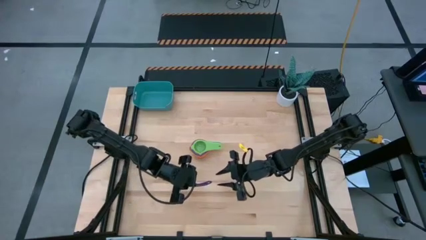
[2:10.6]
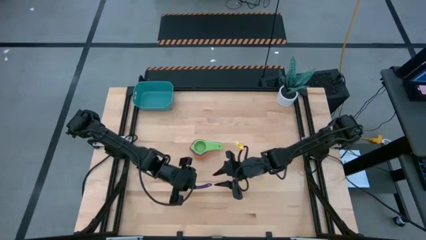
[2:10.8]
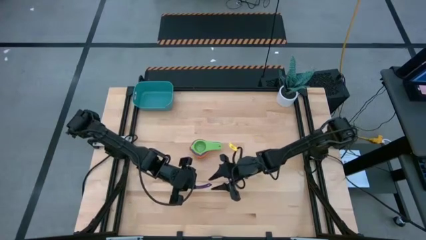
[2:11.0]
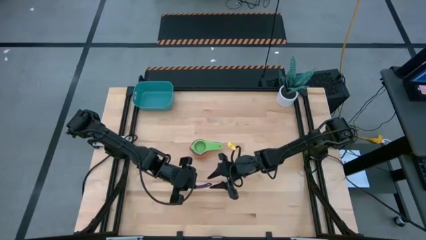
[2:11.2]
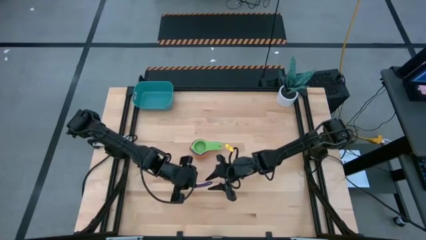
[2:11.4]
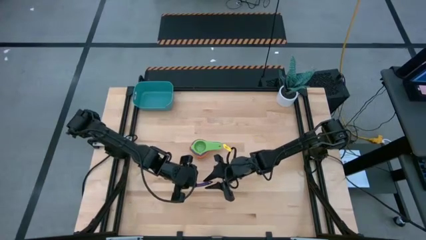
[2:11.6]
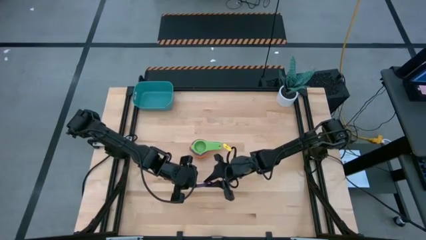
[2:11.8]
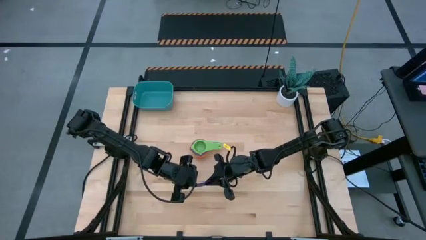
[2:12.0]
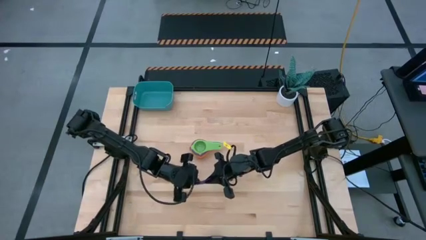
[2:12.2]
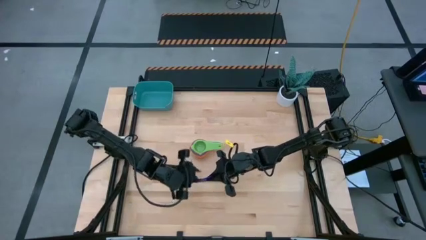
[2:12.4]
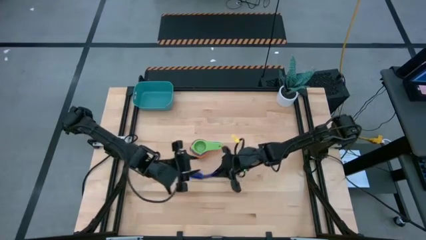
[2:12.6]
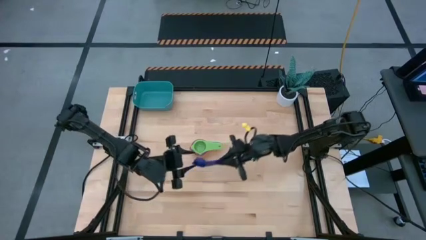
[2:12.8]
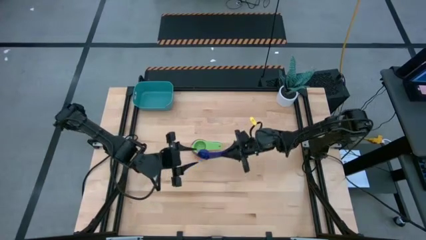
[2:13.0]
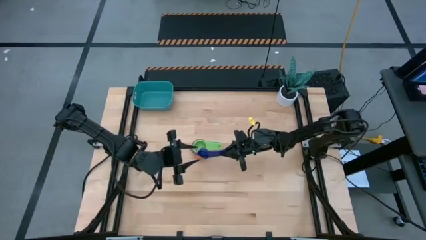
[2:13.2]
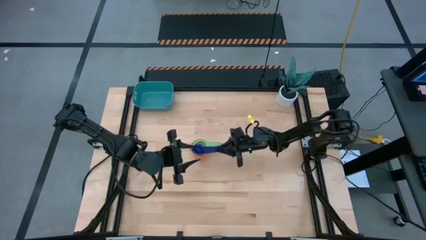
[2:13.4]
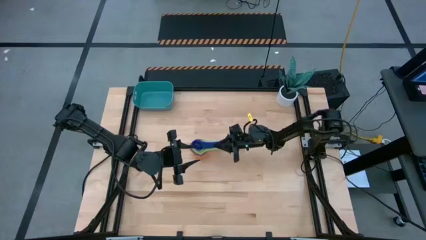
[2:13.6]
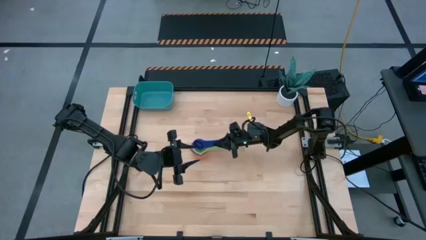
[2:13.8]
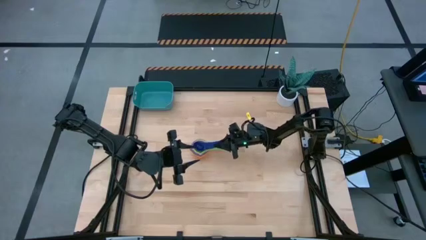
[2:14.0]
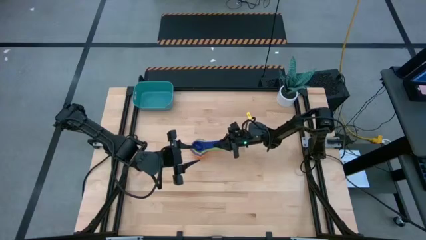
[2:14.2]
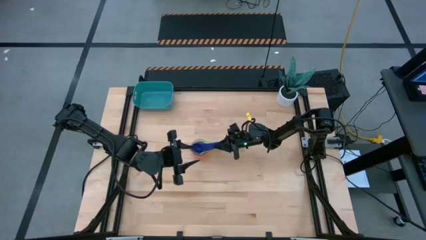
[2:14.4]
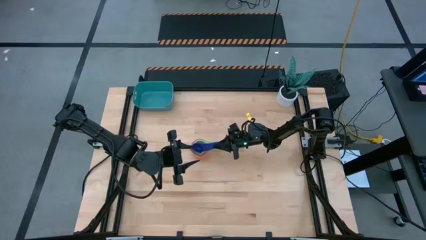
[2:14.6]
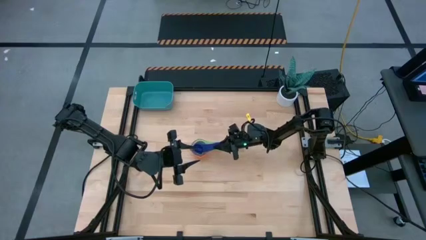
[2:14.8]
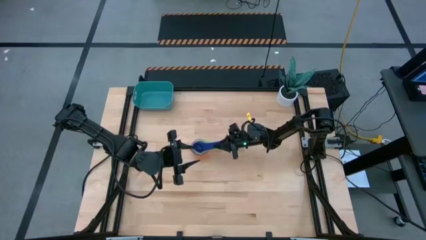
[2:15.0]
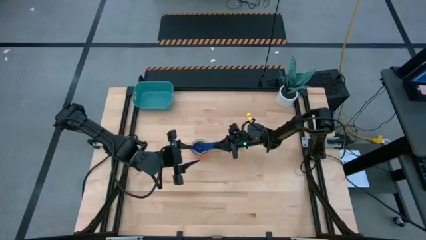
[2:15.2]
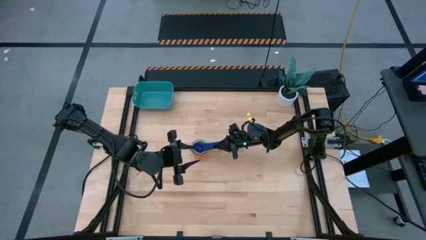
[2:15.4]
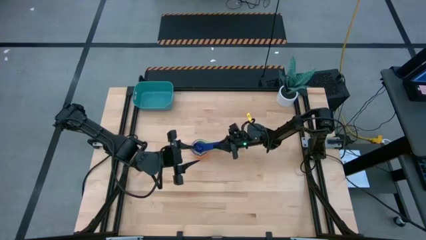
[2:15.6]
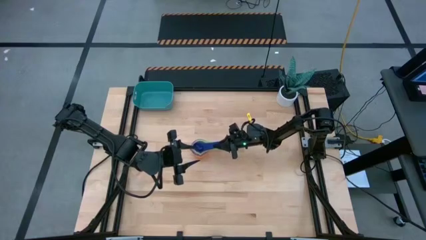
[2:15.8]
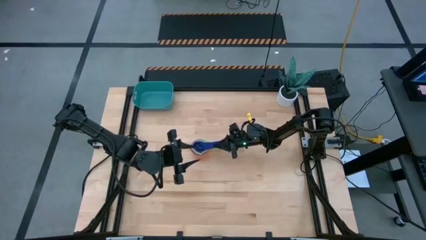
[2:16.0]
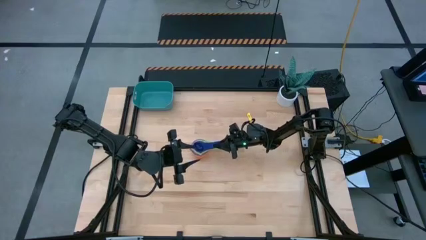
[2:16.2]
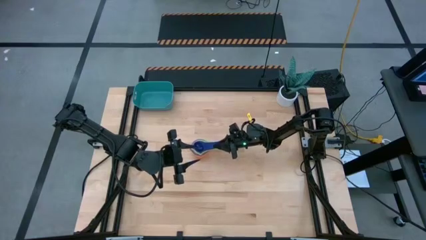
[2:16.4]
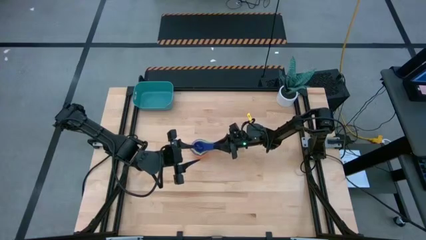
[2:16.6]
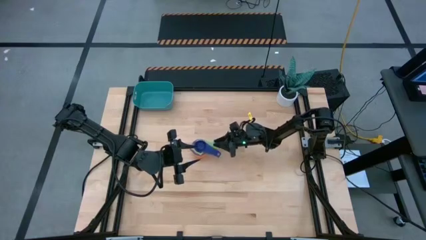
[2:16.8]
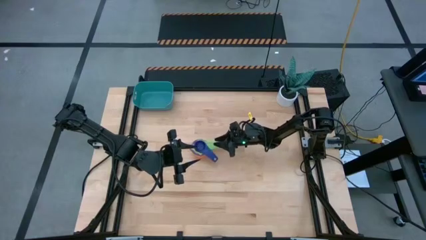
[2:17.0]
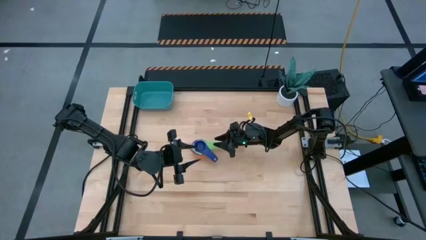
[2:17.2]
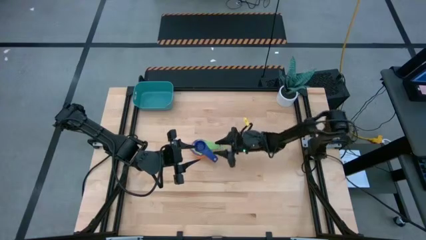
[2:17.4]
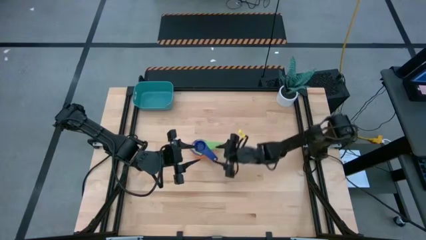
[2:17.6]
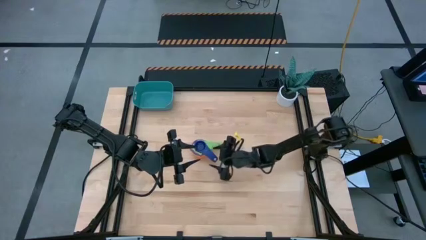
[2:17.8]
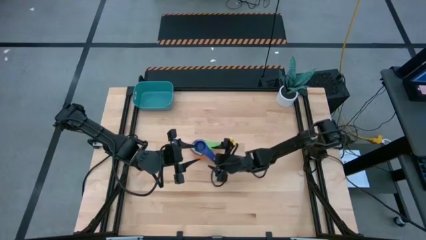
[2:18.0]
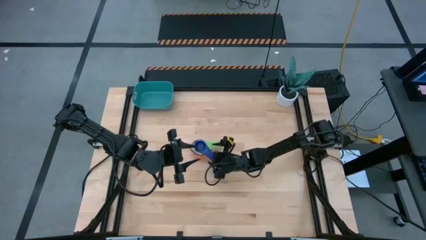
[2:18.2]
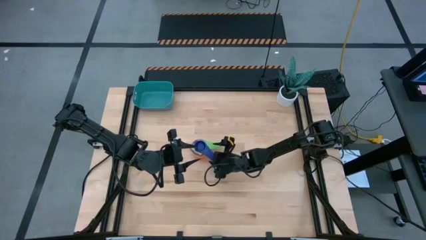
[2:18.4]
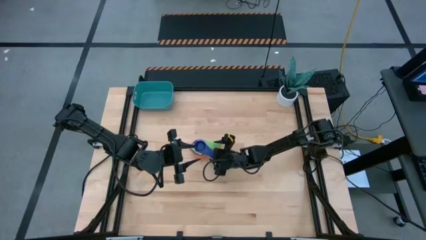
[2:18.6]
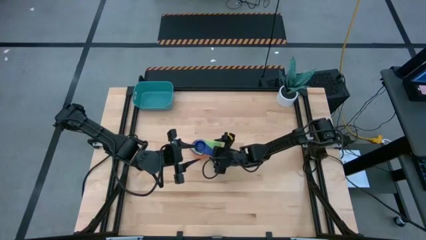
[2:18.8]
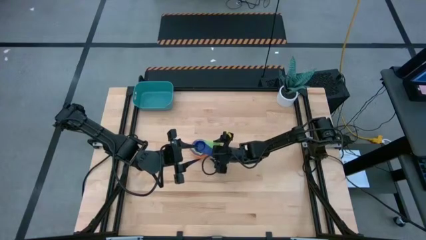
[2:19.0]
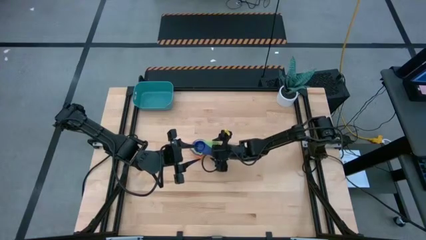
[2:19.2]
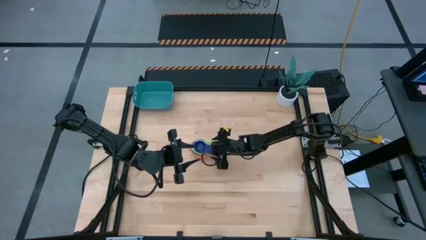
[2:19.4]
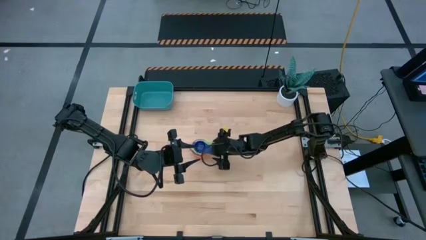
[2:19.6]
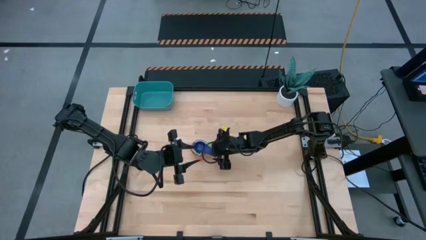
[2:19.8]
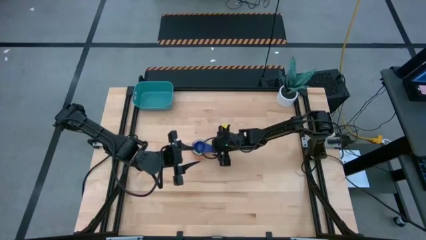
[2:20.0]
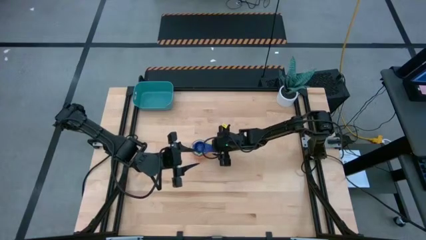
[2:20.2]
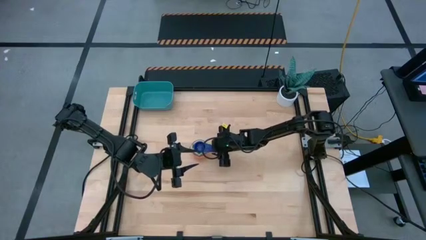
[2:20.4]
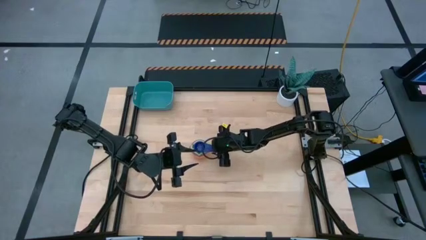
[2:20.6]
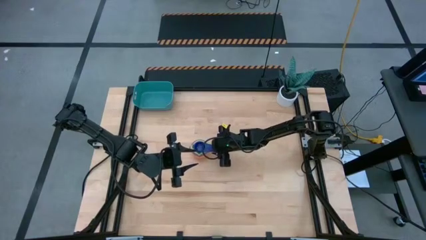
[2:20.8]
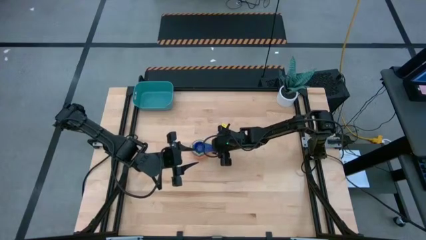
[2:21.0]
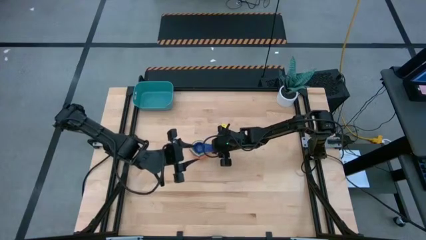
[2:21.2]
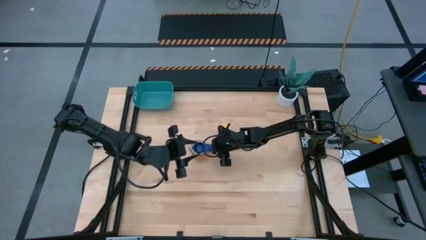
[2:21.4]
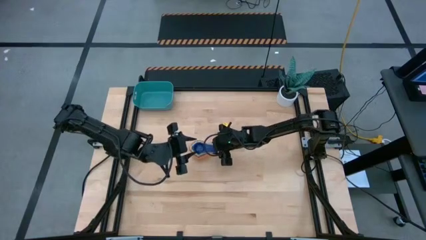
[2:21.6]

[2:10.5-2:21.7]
Task: Nest measuring cups in basket
Stack the dark blue measuring cup on top of the green measuring cup

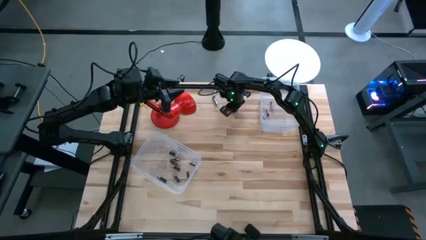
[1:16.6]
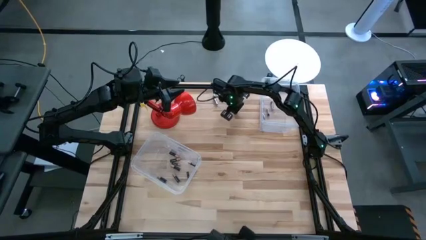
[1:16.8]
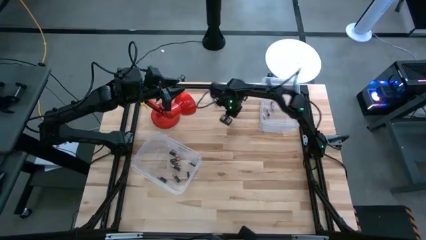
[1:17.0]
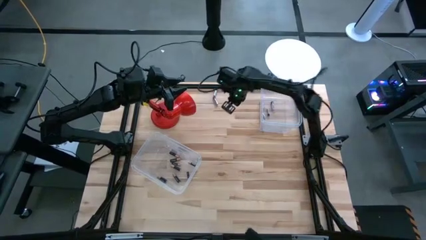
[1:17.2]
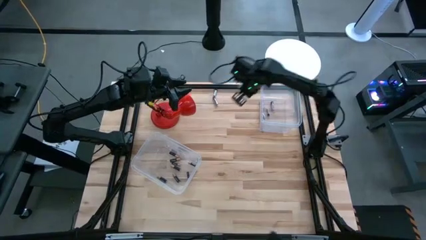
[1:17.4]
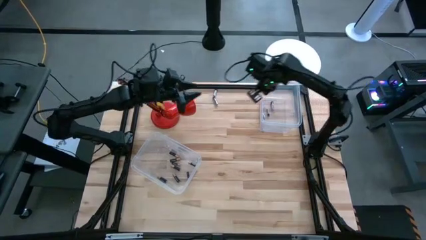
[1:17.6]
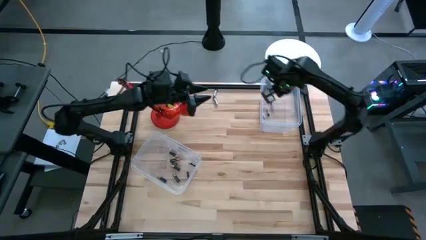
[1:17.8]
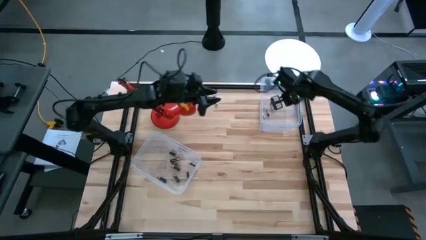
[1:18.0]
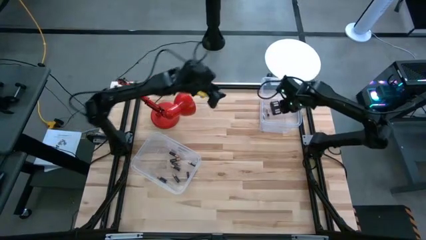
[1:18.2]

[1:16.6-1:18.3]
Task: Sort batteries
Put the silver battery into the top transparent bin

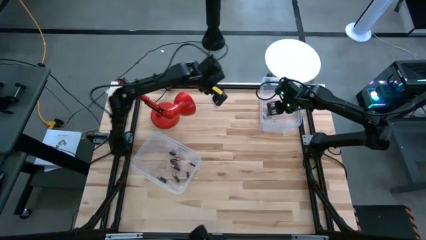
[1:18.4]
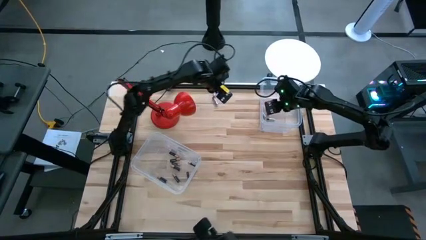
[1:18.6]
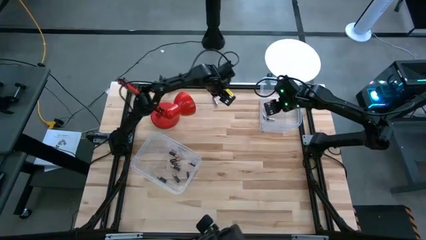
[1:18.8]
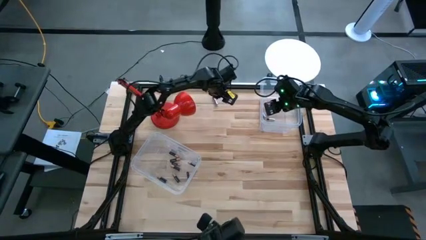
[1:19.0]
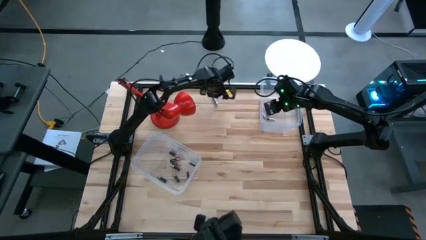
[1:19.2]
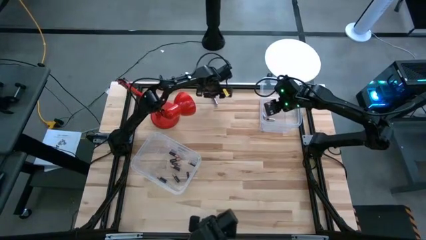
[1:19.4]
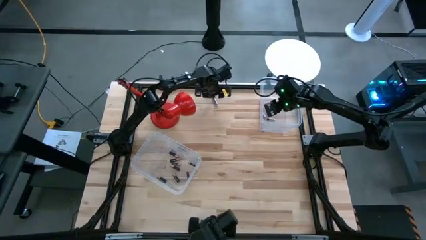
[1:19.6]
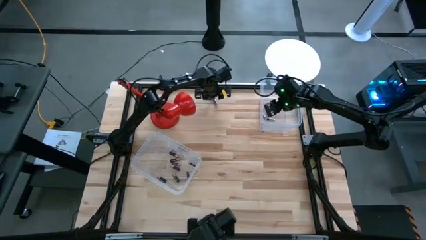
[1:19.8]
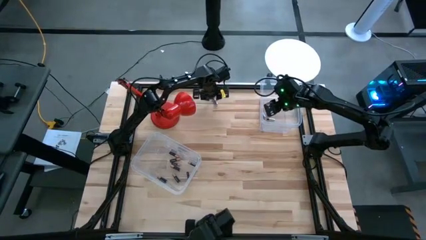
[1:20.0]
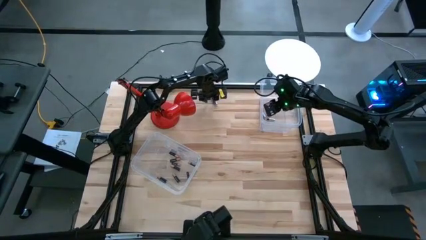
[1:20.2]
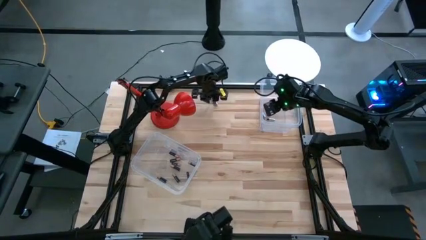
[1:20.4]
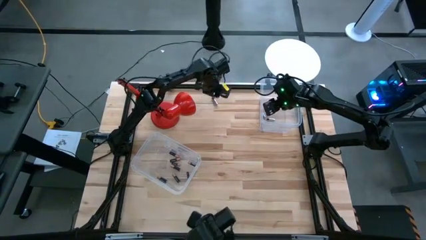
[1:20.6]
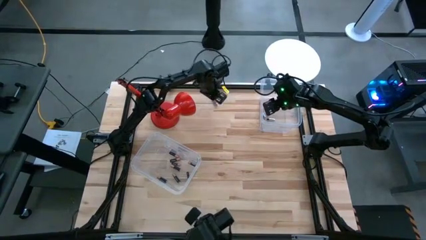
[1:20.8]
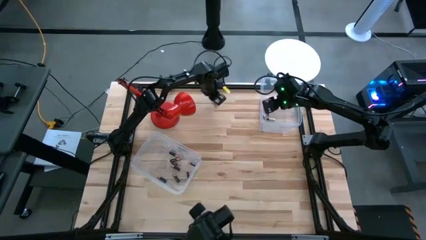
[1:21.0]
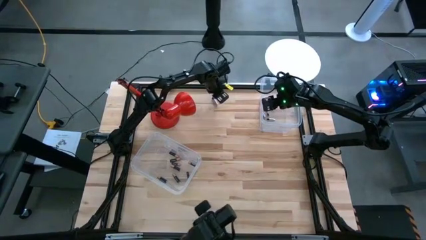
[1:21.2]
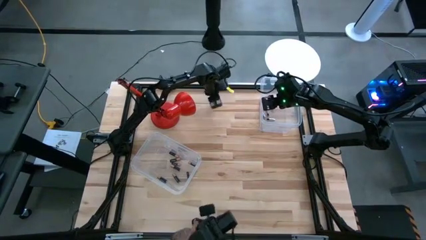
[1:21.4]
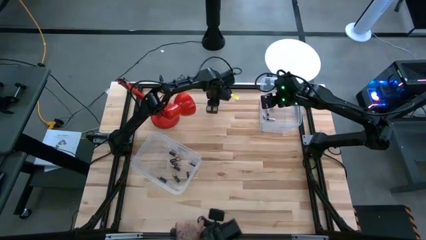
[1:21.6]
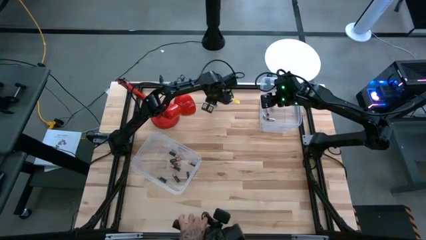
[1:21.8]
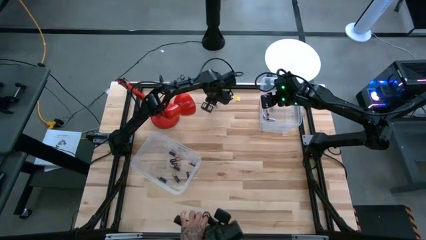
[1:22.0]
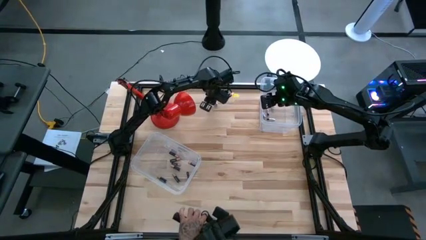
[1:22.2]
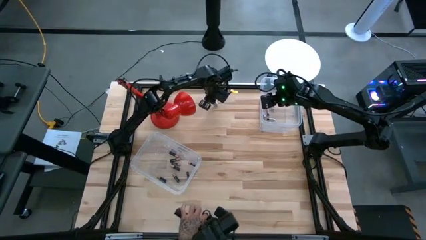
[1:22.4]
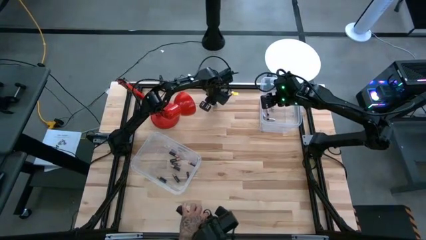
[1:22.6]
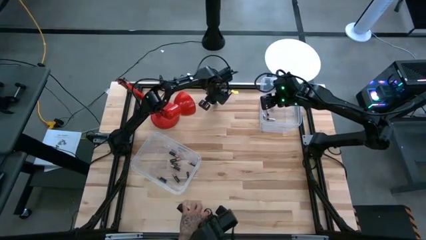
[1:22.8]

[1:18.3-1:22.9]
Put the silver battery into the top transparent bin
